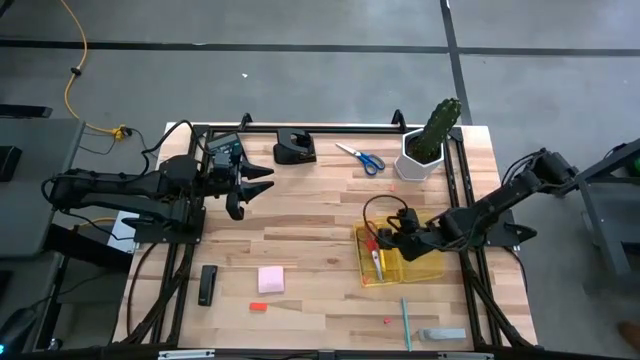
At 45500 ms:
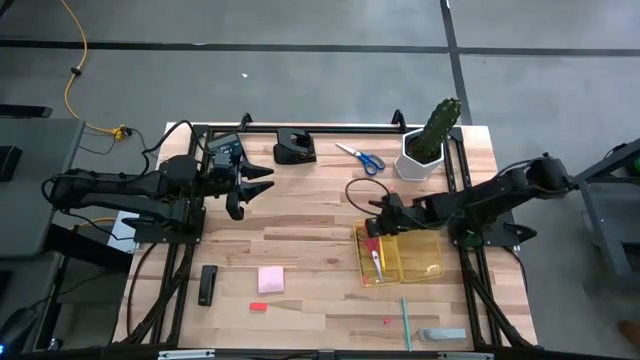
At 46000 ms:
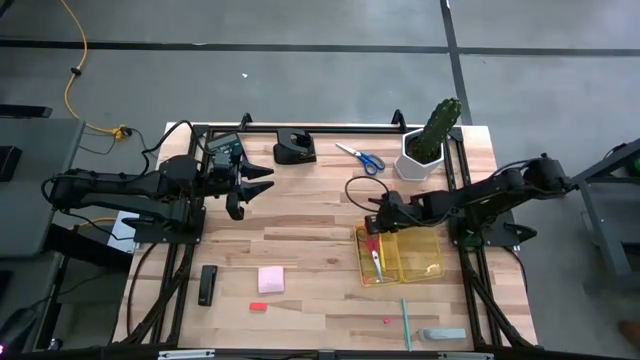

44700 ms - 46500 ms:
Task: Pack school essentials
Adjust the red scissors in the box

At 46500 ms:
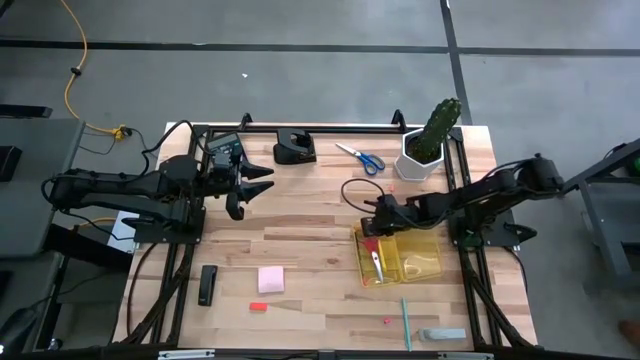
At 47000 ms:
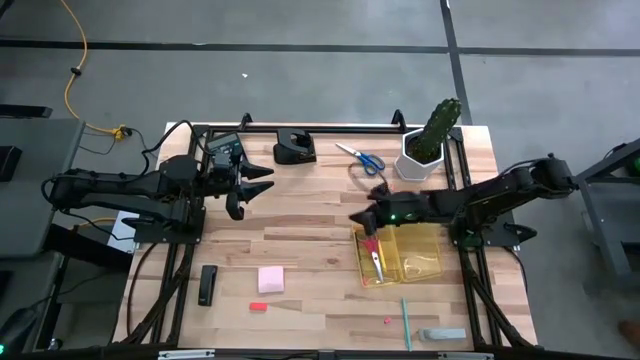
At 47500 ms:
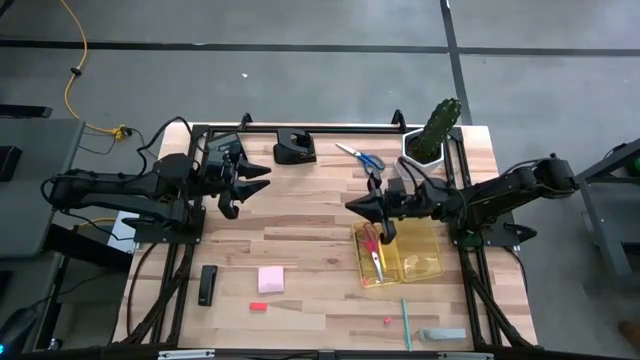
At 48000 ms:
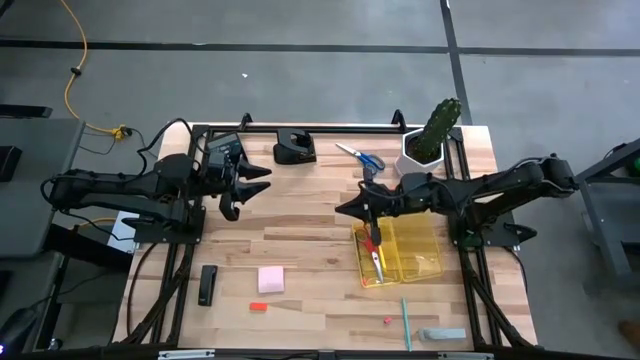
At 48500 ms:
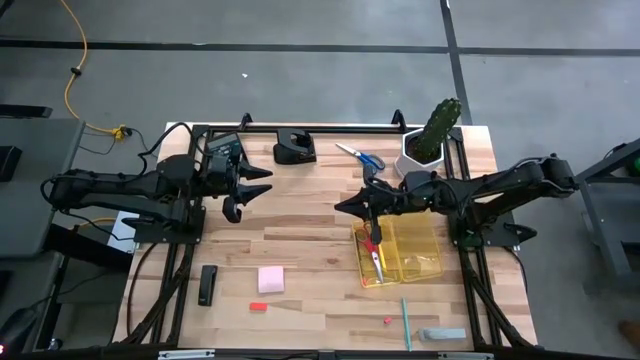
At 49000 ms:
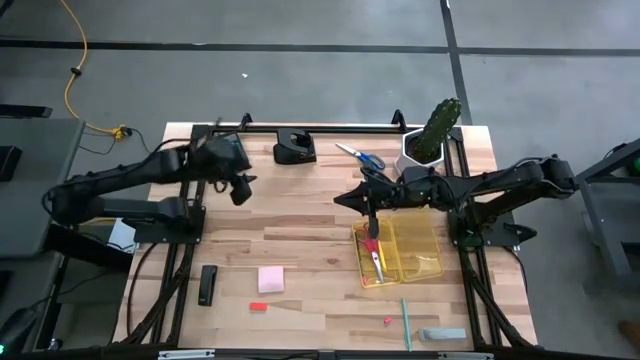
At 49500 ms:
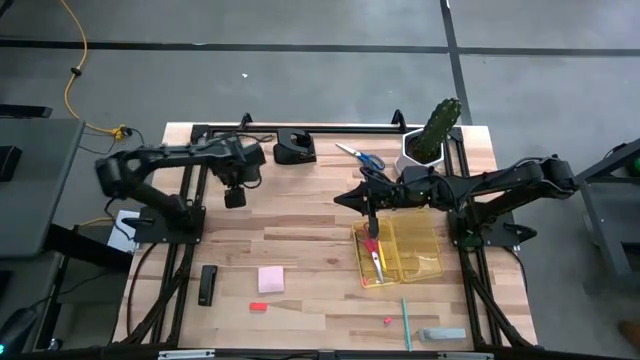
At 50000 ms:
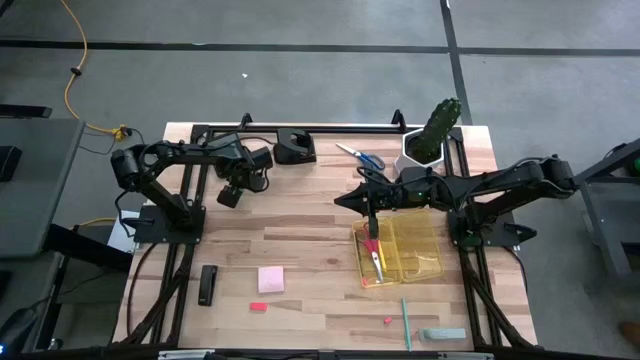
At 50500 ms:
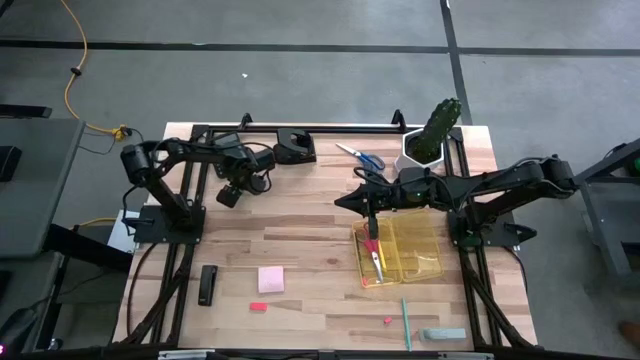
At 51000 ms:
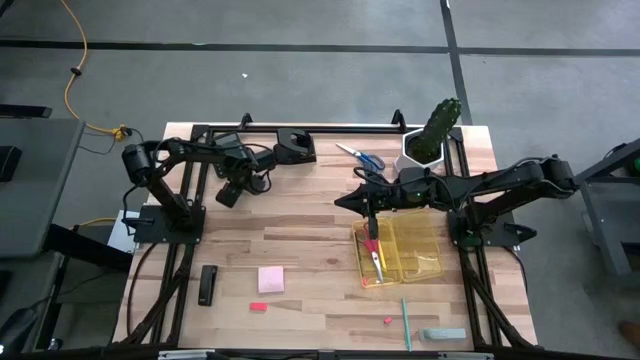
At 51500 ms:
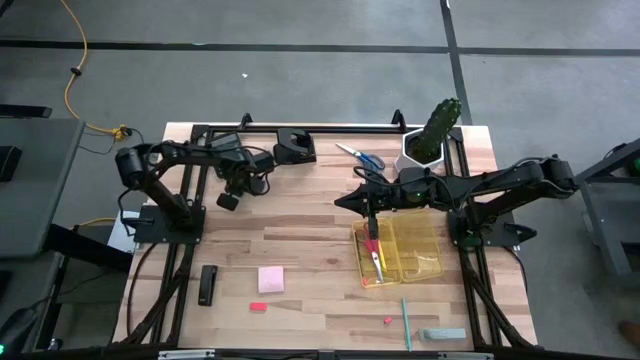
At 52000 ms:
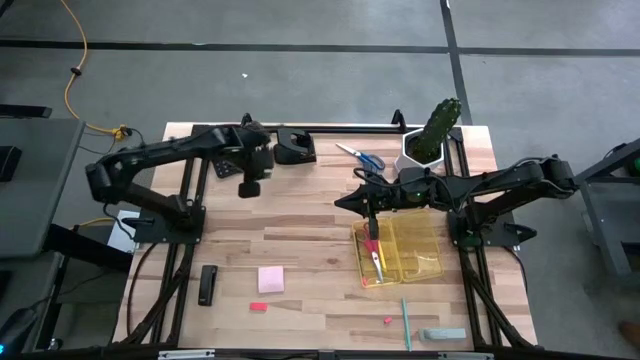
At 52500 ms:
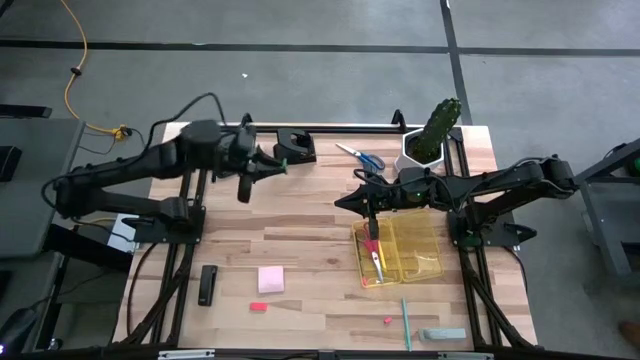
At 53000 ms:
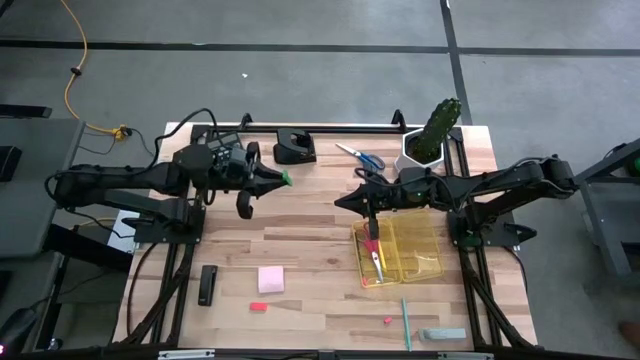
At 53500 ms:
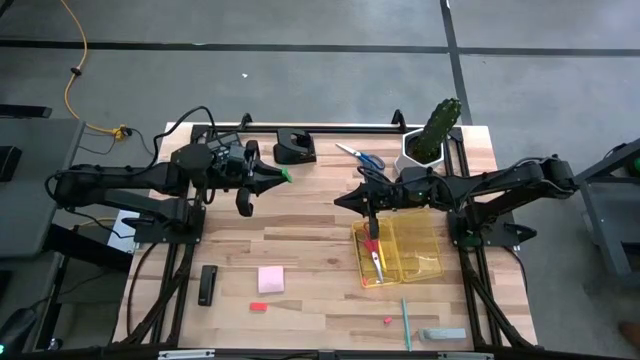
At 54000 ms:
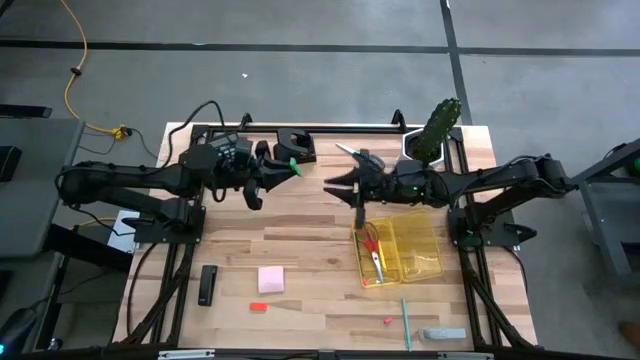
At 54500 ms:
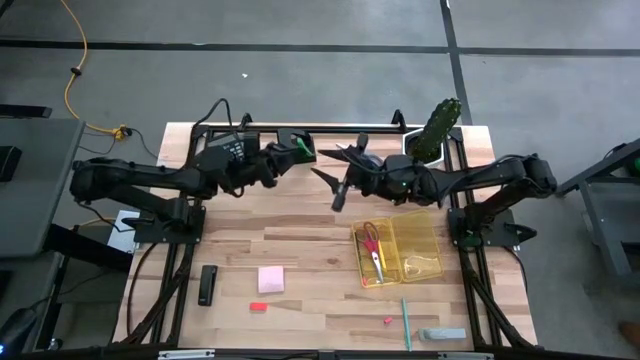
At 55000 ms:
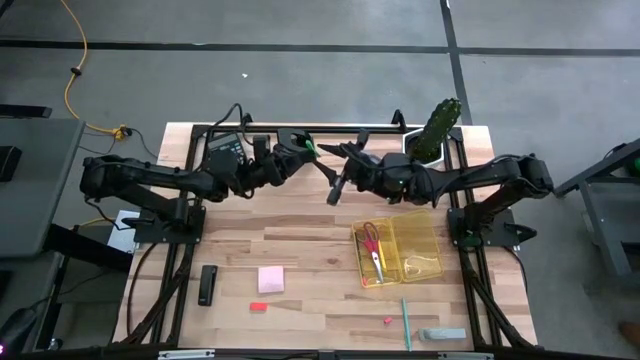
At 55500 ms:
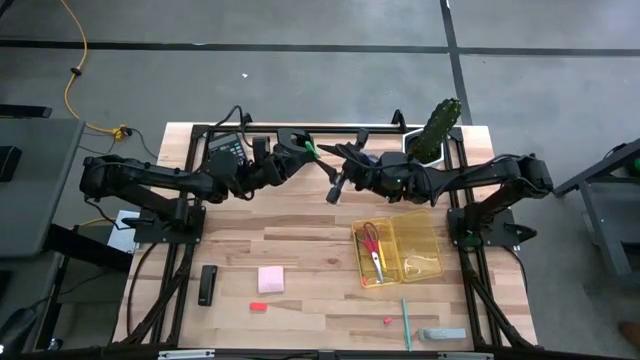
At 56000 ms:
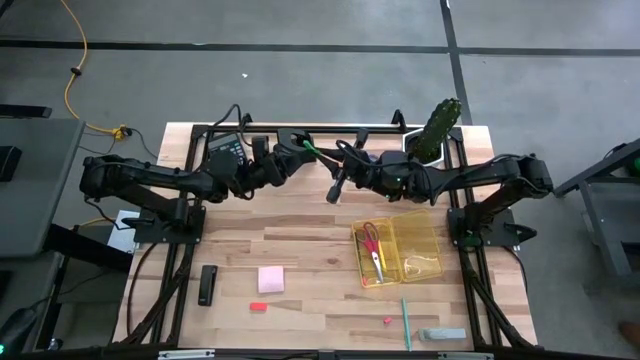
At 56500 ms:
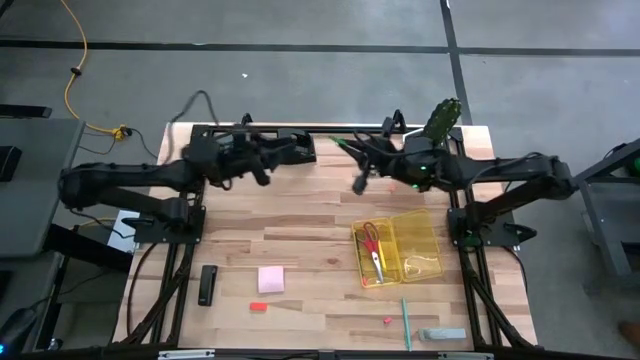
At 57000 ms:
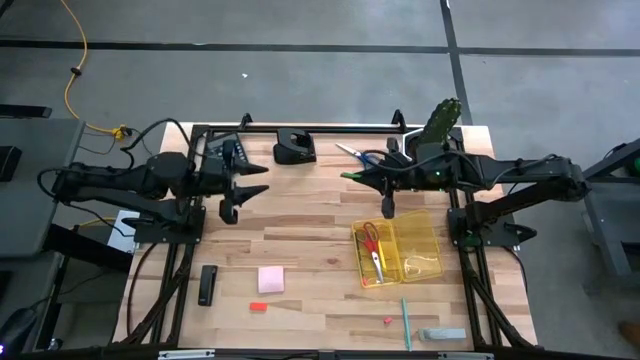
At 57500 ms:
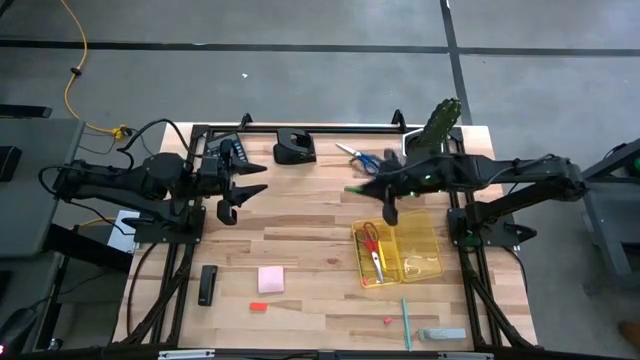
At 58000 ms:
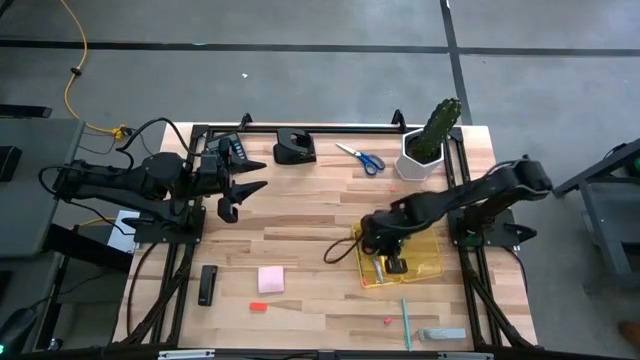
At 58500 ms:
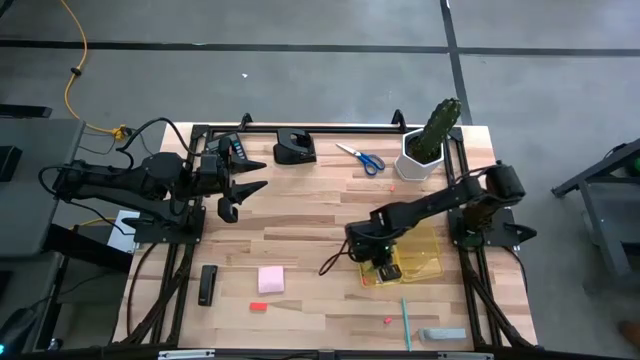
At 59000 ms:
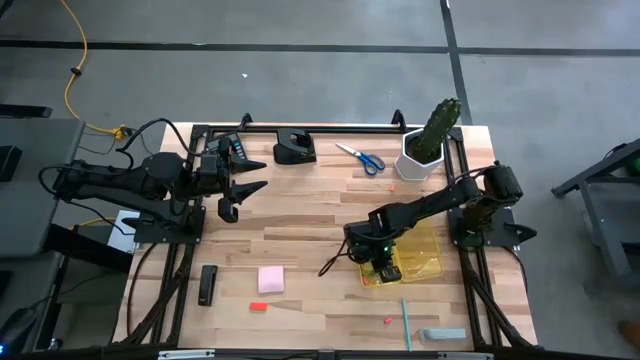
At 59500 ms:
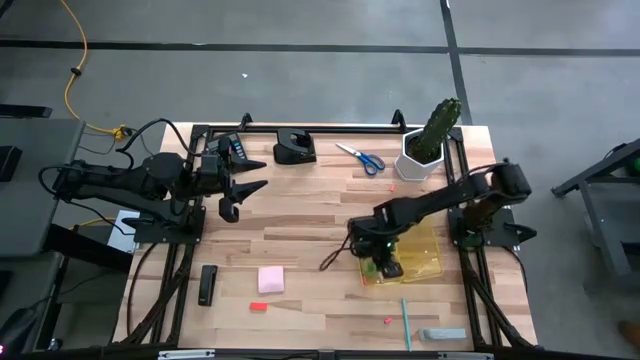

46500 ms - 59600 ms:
Put the green eraser into the yellow box

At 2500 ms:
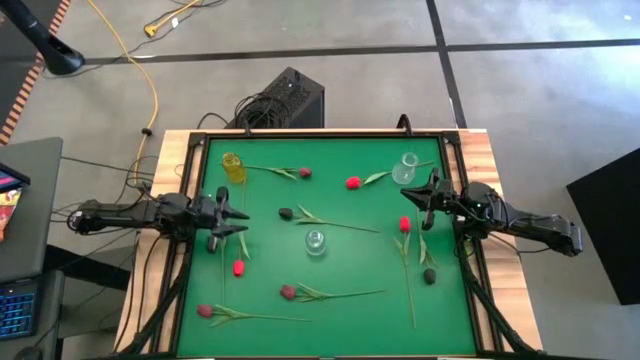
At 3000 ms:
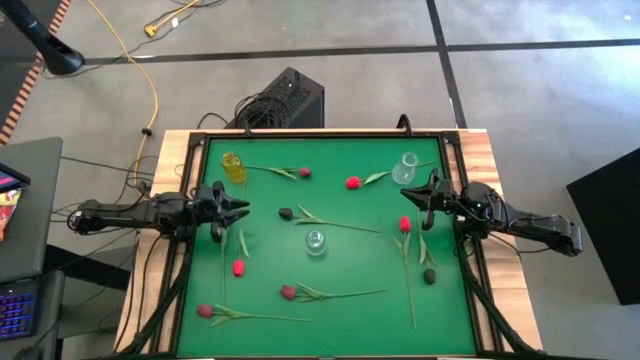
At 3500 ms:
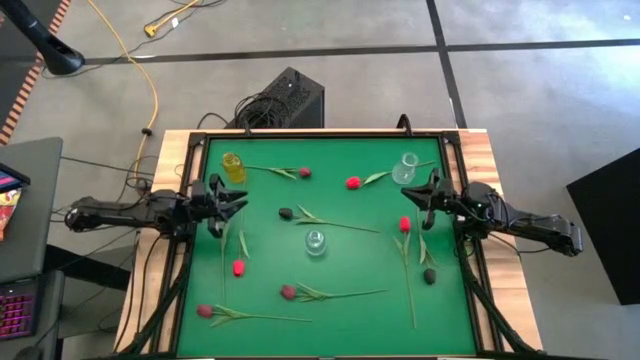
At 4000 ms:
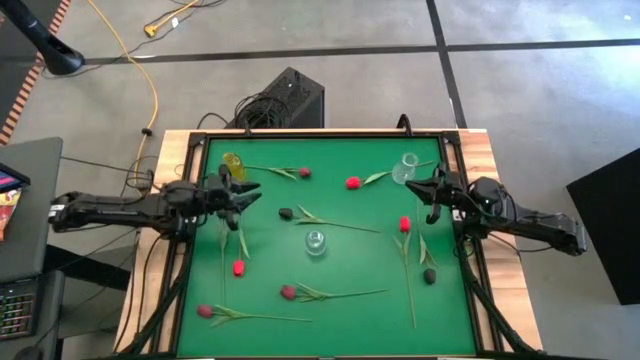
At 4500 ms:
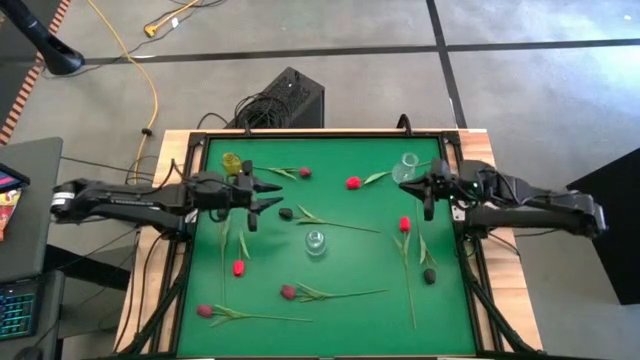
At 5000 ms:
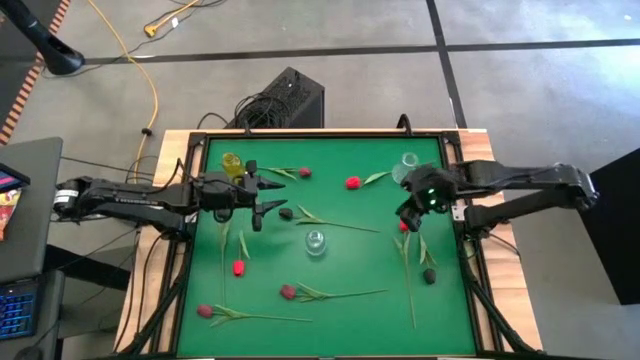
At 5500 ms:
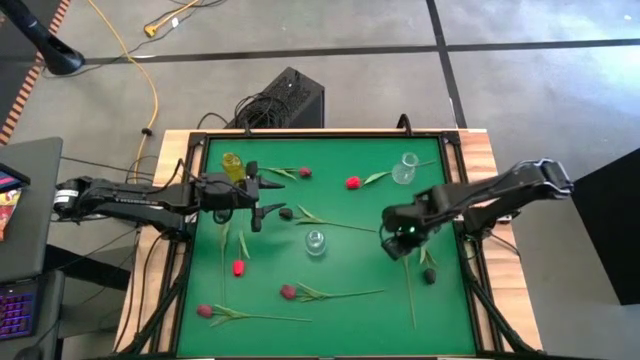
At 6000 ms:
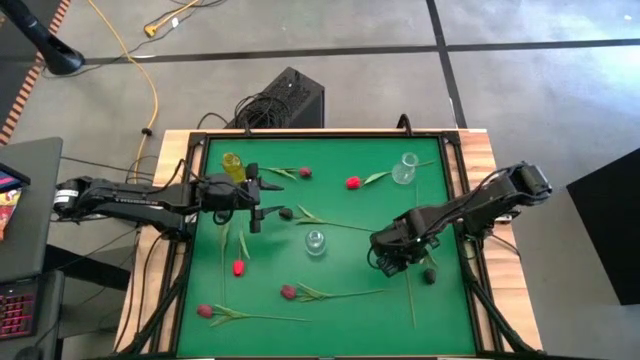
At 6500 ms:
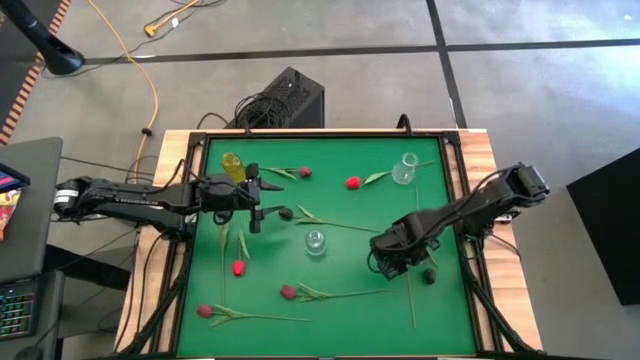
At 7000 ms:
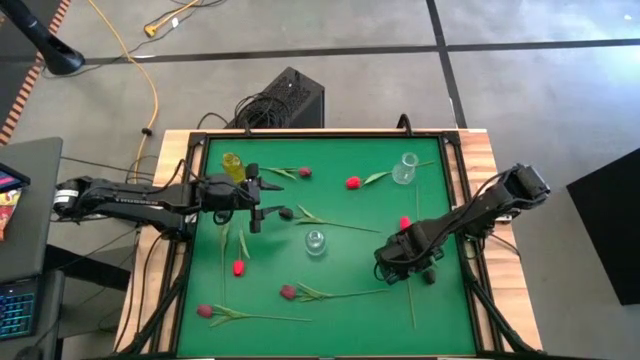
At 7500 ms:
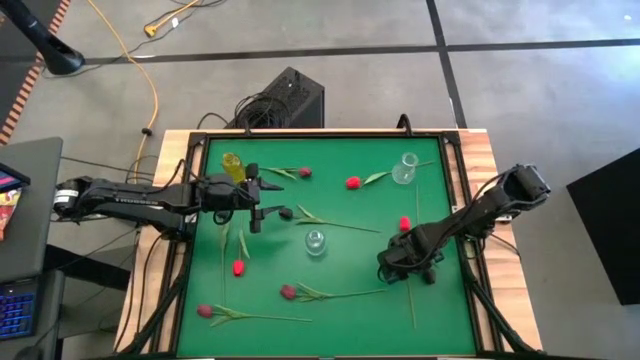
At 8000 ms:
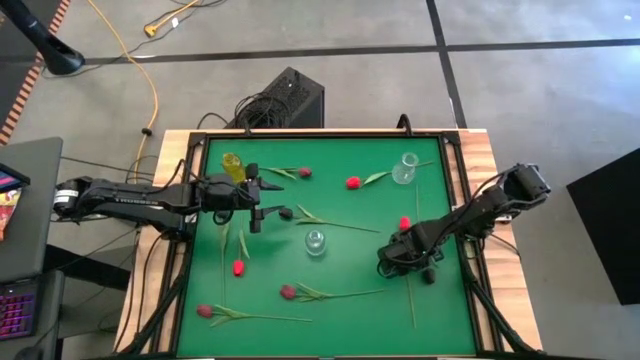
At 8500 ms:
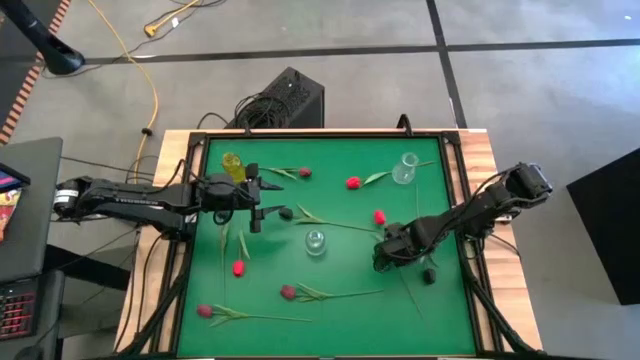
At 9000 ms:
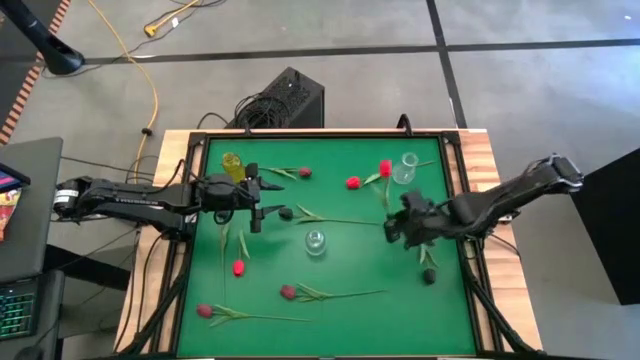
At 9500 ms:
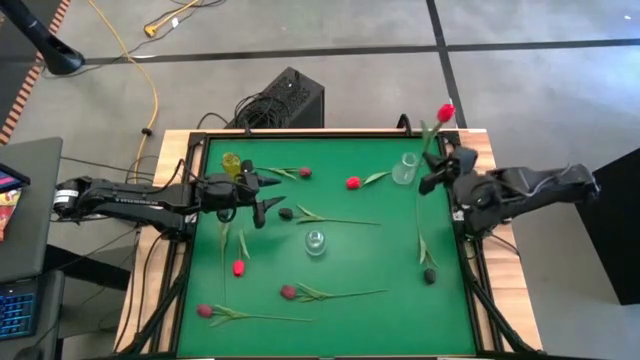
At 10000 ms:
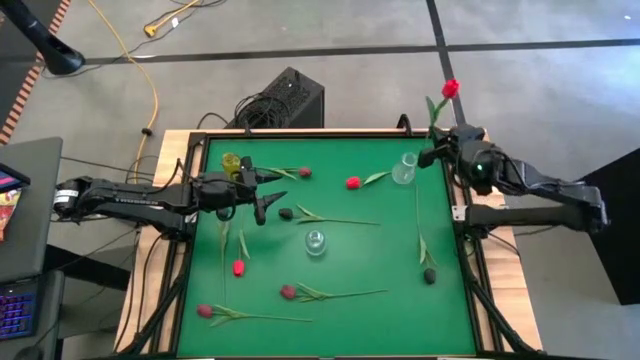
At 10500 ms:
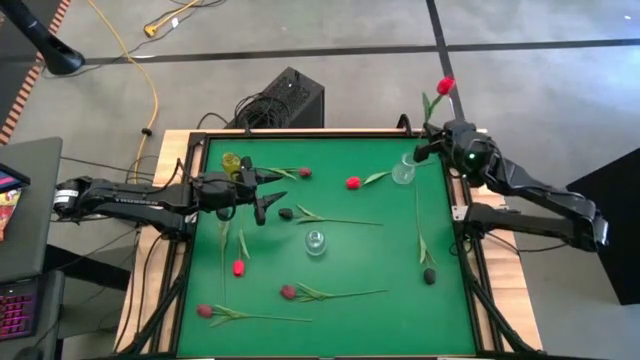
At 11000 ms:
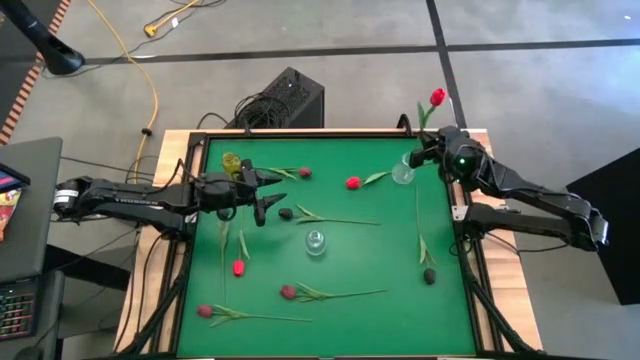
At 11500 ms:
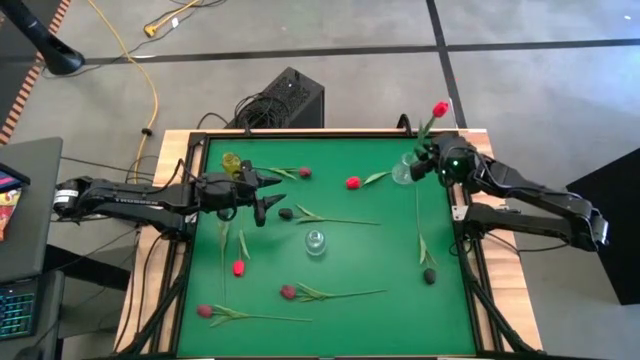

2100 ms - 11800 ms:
Task: Sort flowers into vase by color
Put the right red tulip into the right transparent vase
